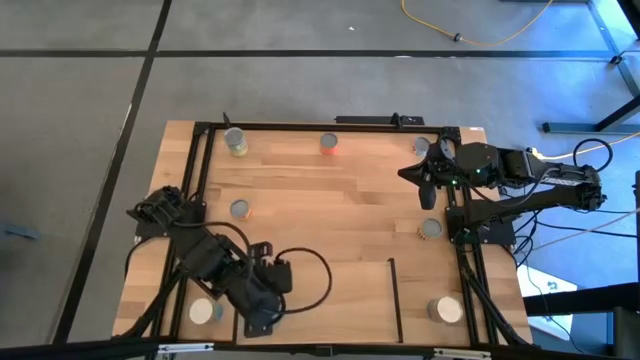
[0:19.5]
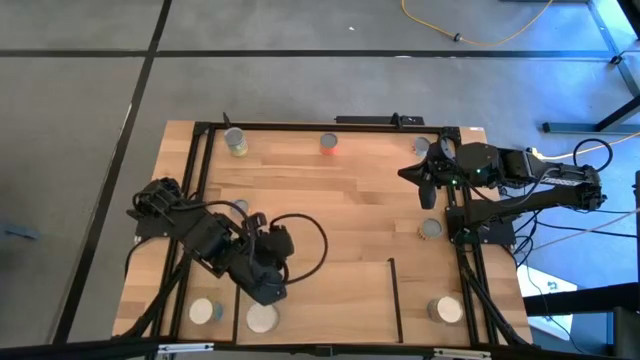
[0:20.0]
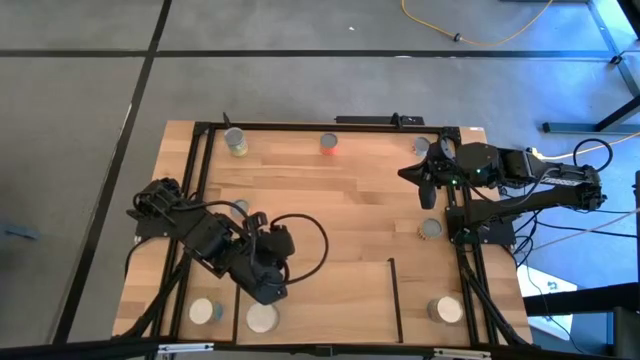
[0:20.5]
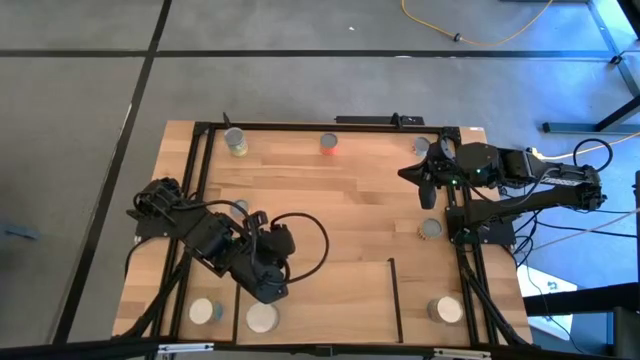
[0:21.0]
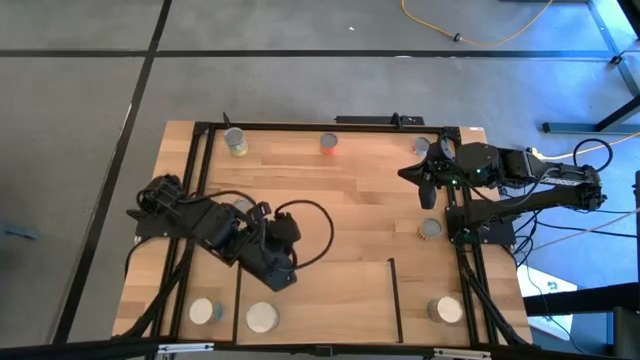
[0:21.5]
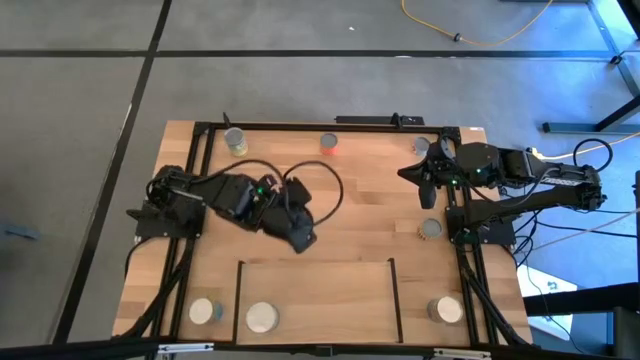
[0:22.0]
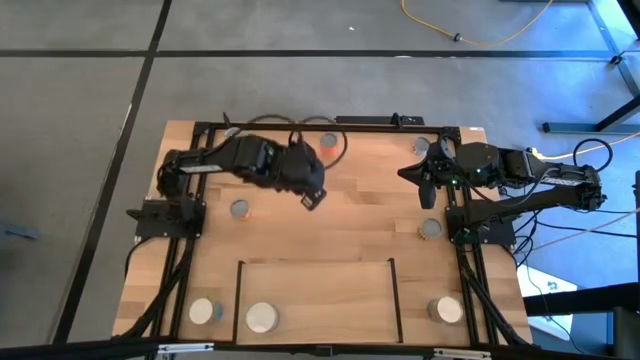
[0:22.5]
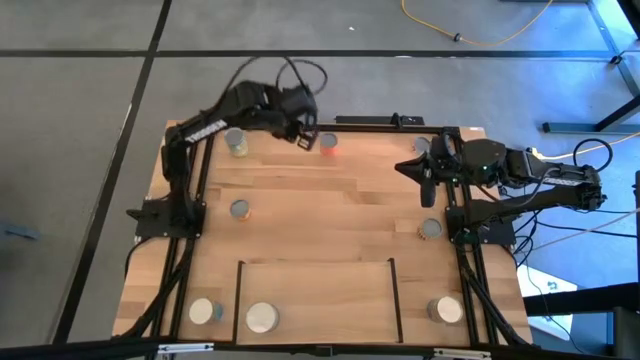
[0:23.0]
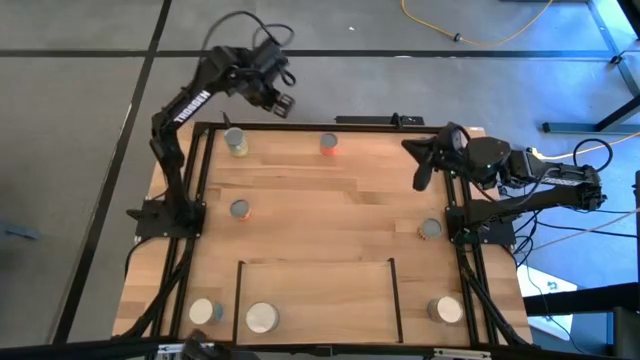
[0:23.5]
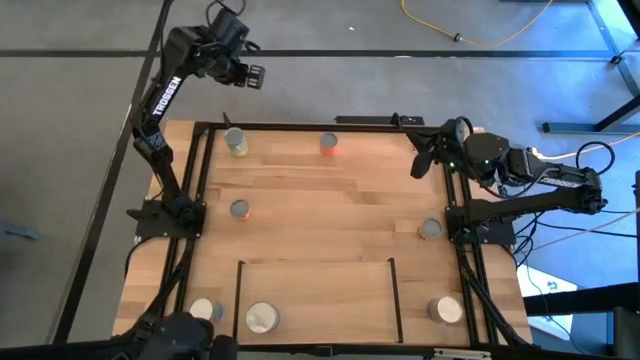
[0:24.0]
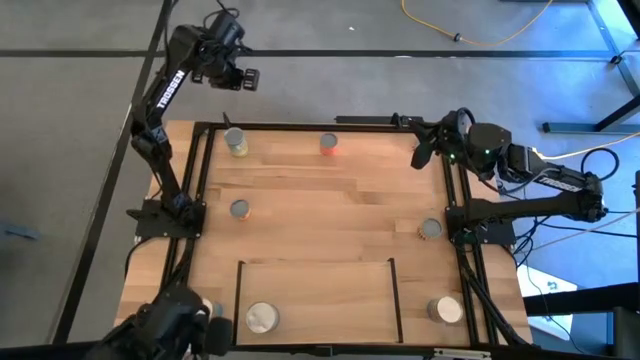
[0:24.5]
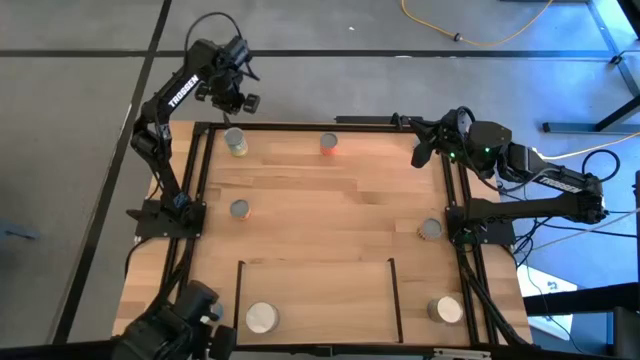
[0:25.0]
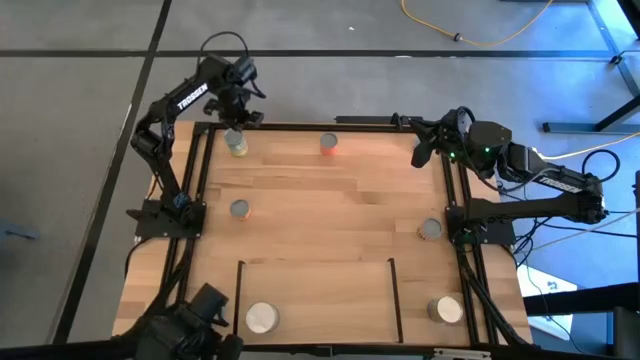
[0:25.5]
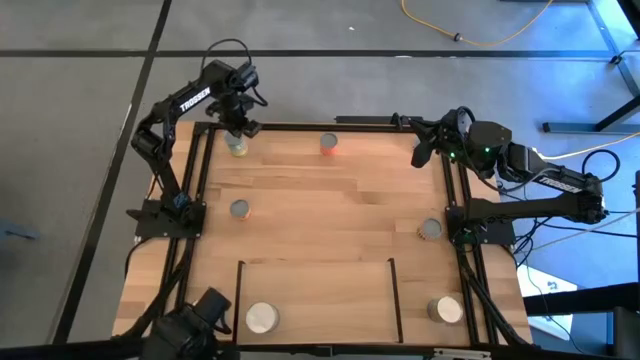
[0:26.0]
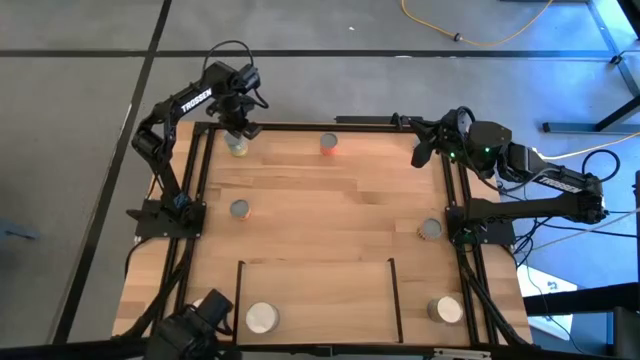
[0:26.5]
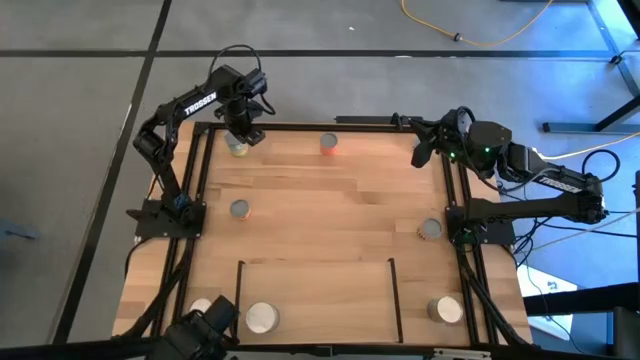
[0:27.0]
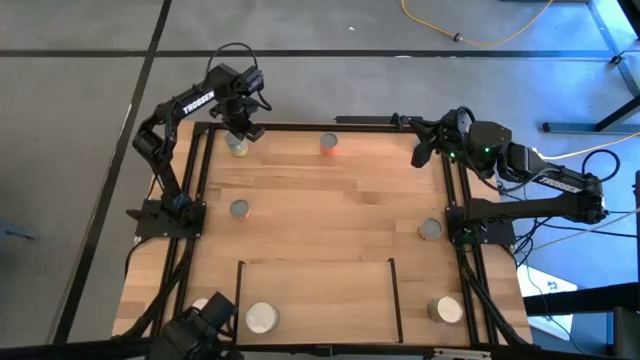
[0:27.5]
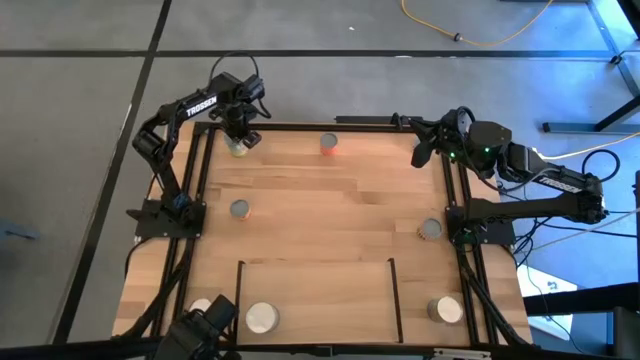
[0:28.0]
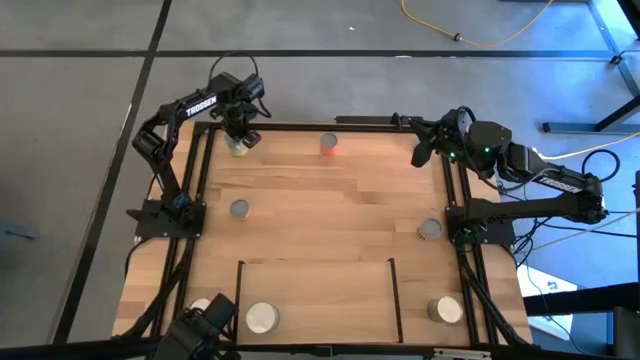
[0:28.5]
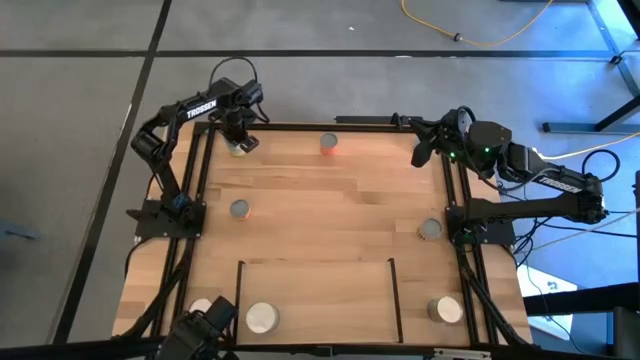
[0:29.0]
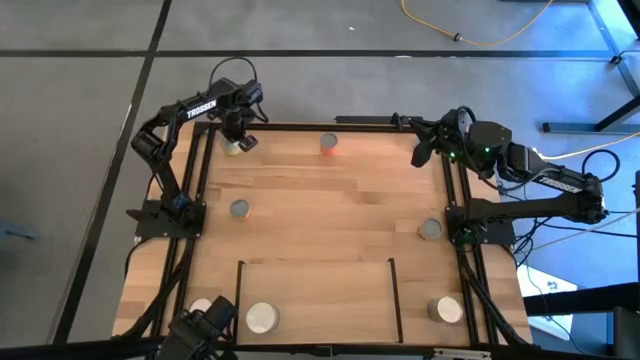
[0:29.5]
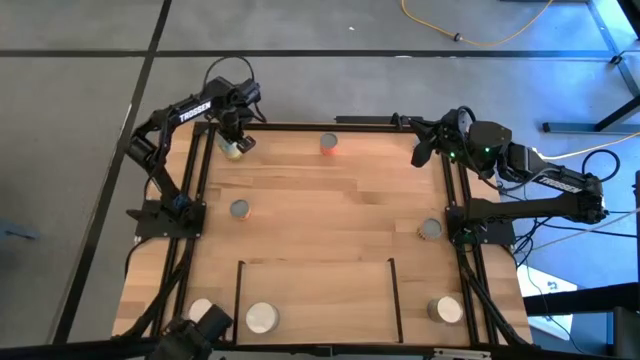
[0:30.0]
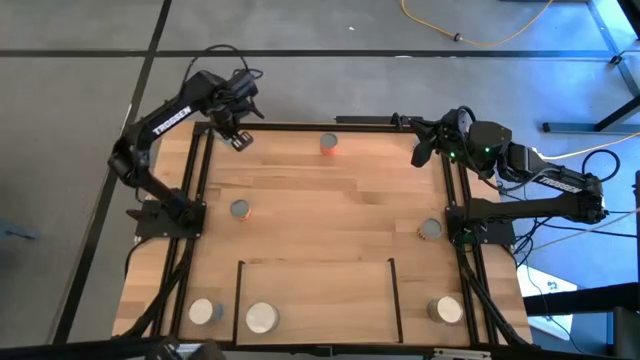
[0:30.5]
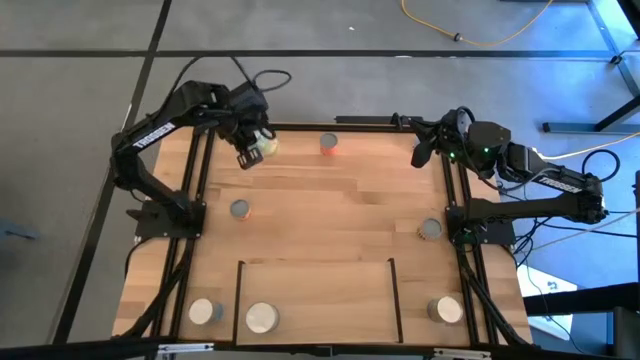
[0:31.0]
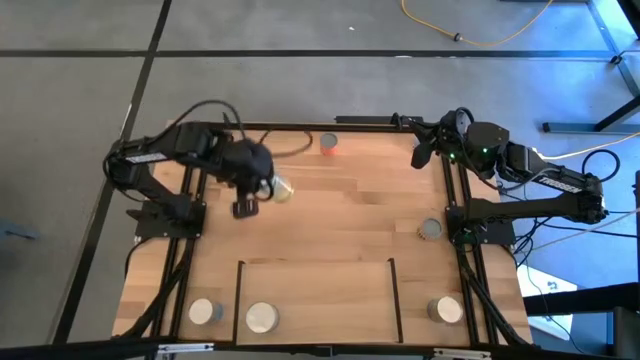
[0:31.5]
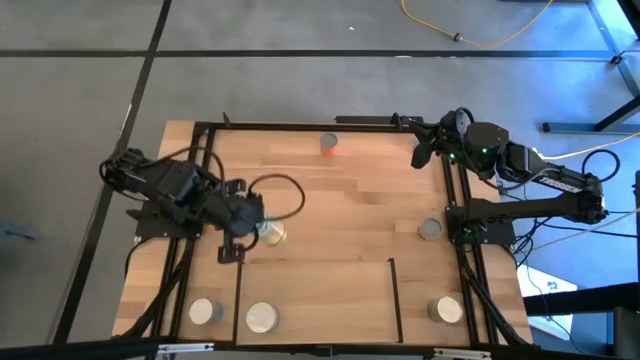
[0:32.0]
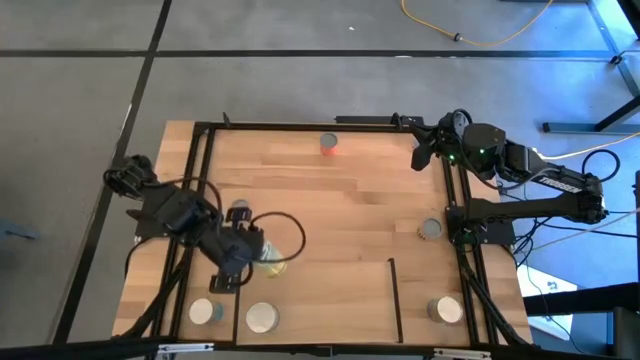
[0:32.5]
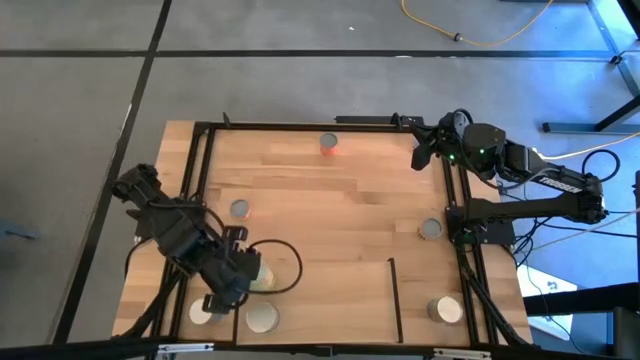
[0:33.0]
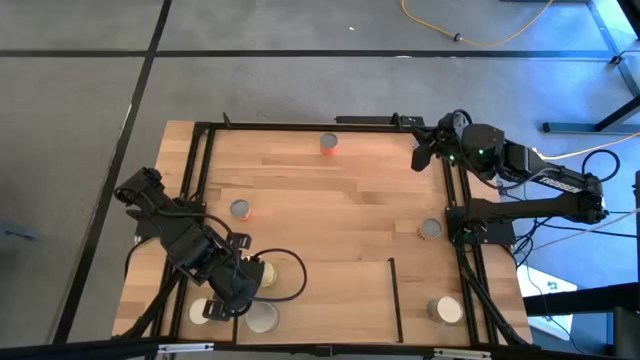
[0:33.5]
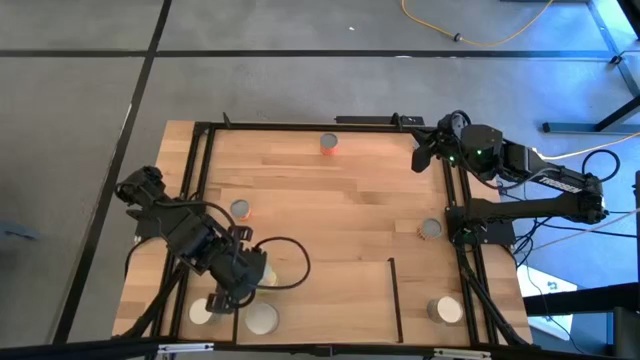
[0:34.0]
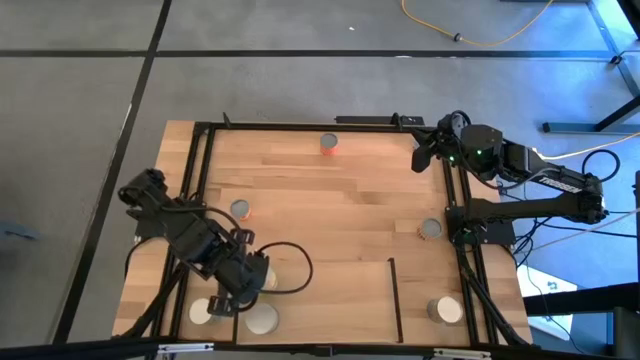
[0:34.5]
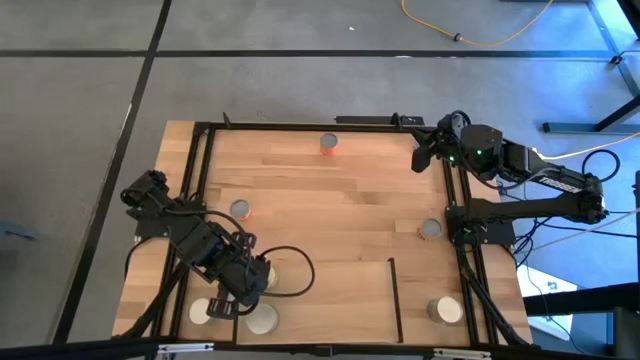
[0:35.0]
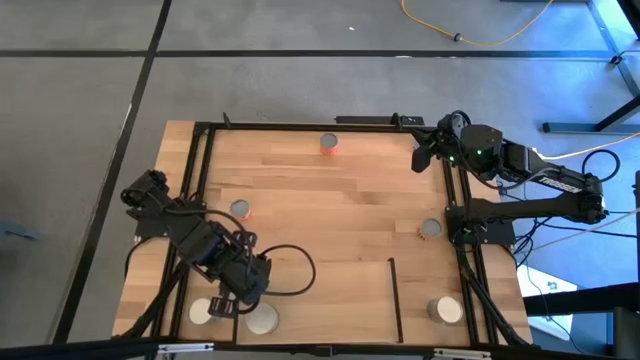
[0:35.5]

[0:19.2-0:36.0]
Task: Pick and place cans onto a shelf
Put the canned carrots on the shelf

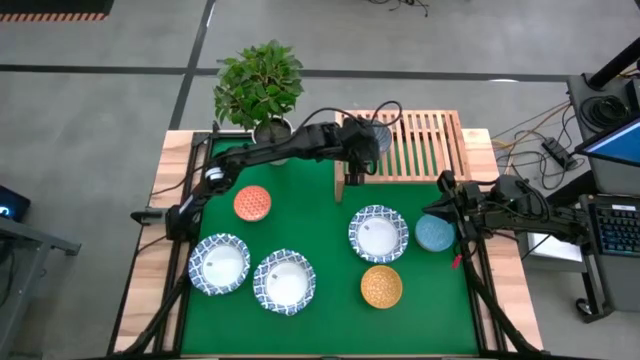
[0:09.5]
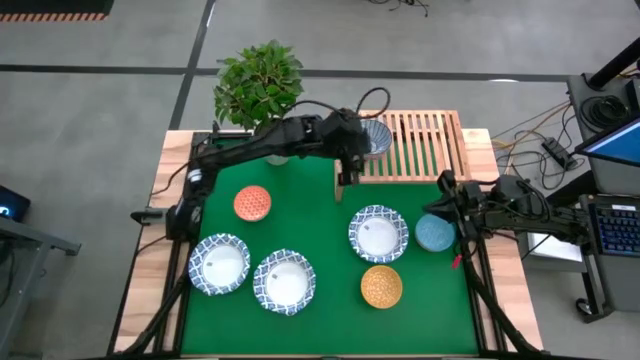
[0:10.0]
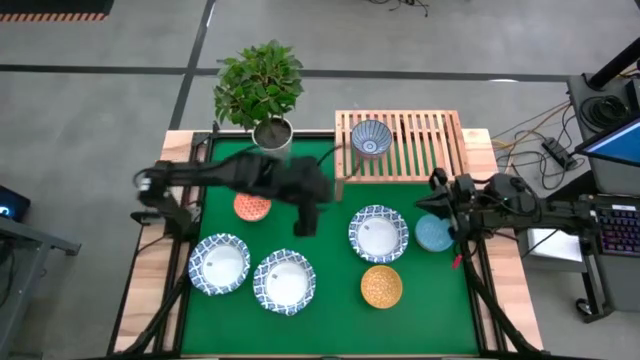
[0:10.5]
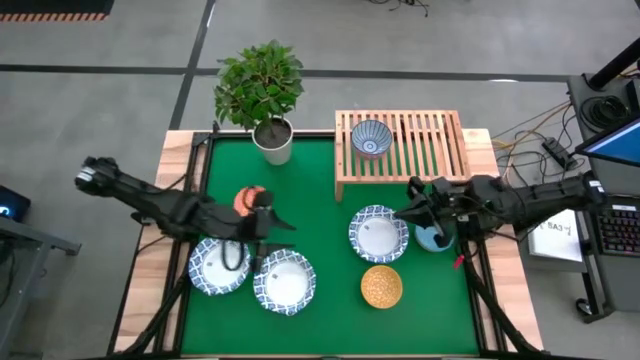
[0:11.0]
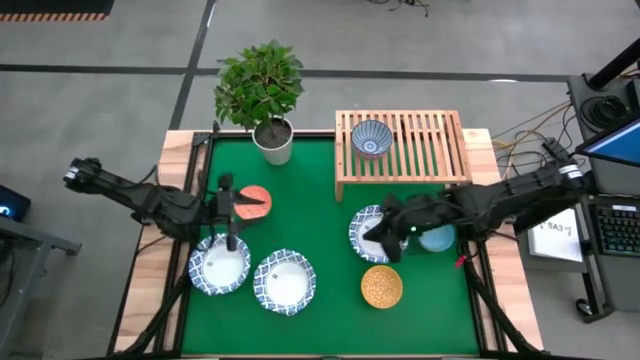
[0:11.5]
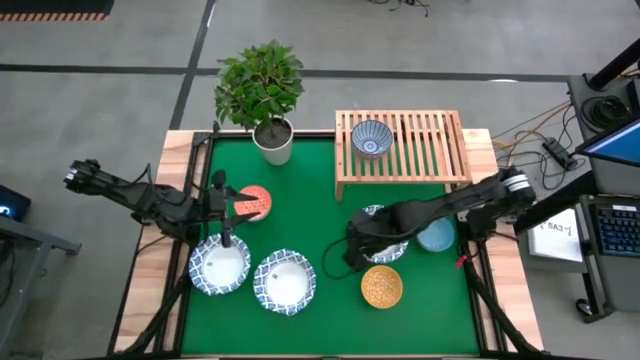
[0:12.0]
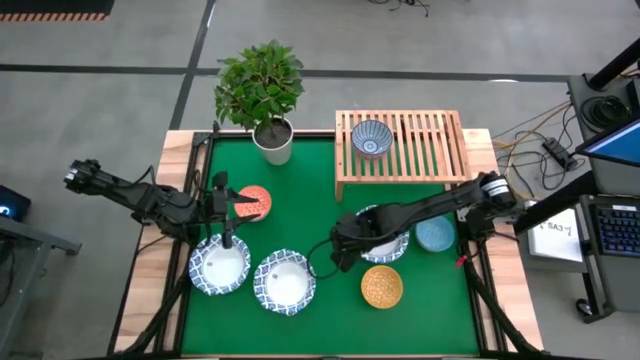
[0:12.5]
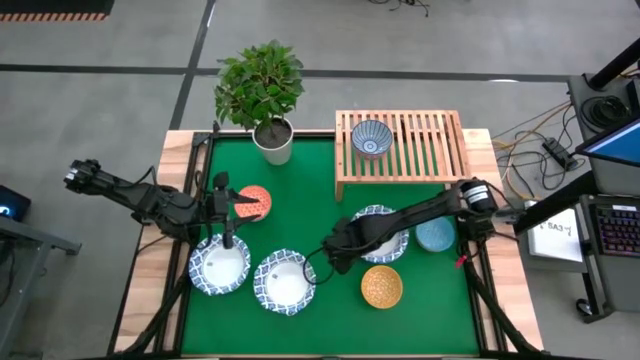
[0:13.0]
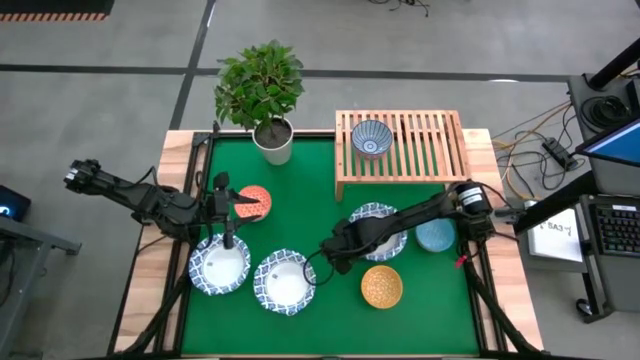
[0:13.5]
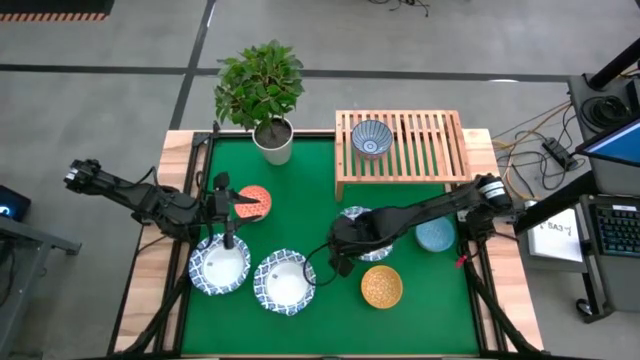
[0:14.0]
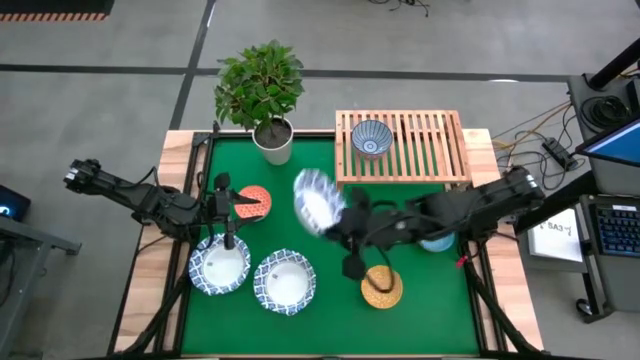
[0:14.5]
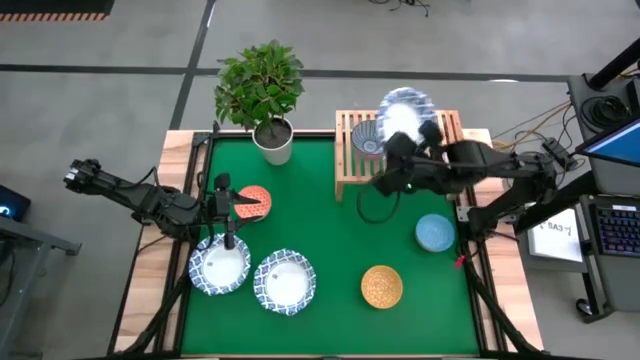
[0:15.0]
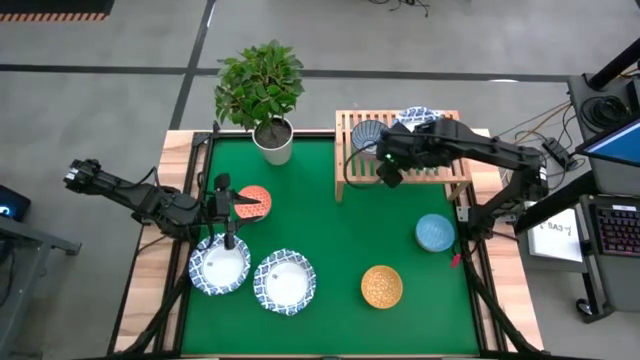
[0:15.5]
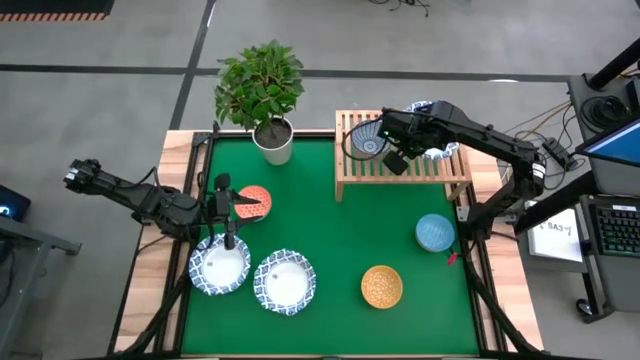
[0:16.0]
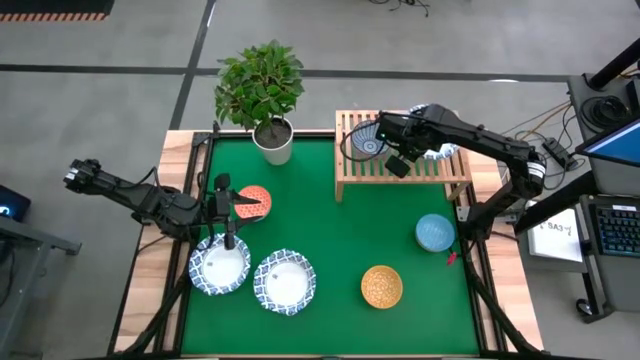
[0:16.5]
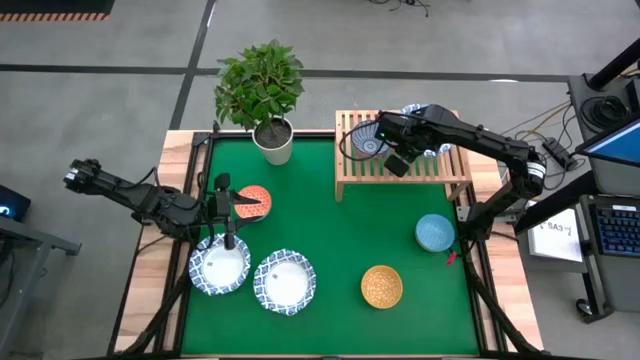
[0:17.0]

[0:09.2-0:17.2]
Task: Place and stack bowls onto a shelf
Put the white patterned bowl on the shelf
